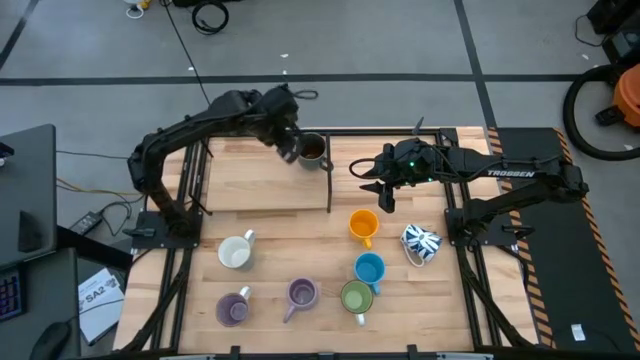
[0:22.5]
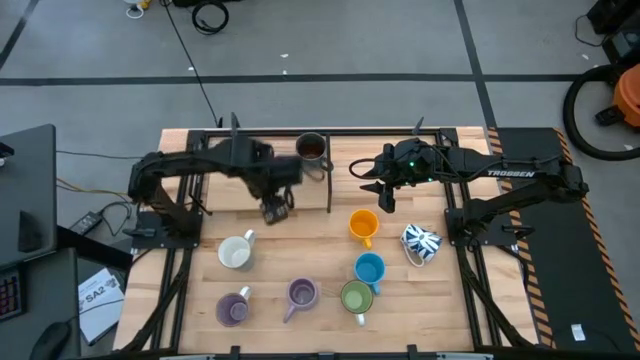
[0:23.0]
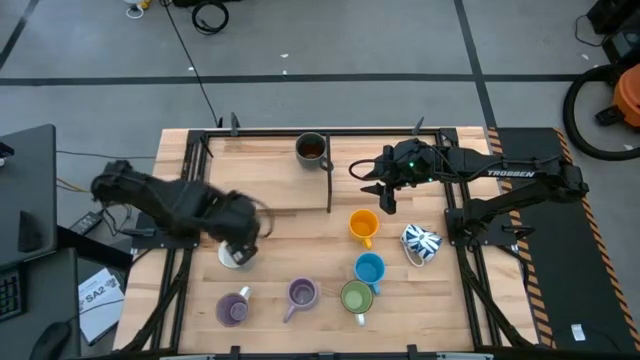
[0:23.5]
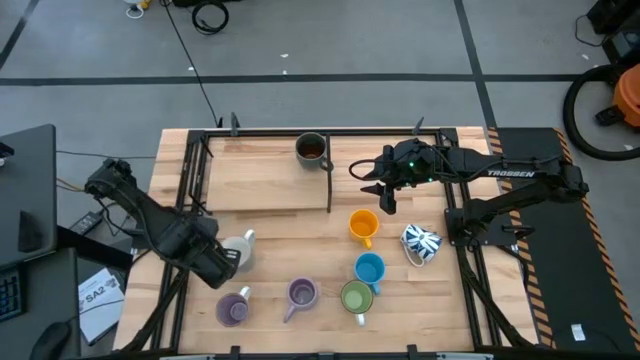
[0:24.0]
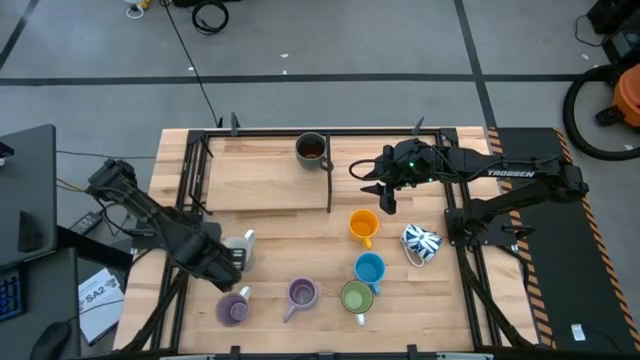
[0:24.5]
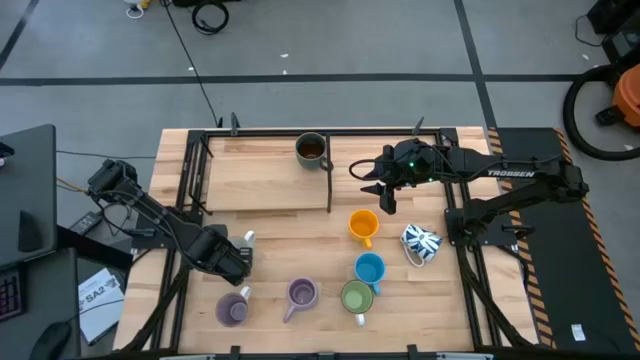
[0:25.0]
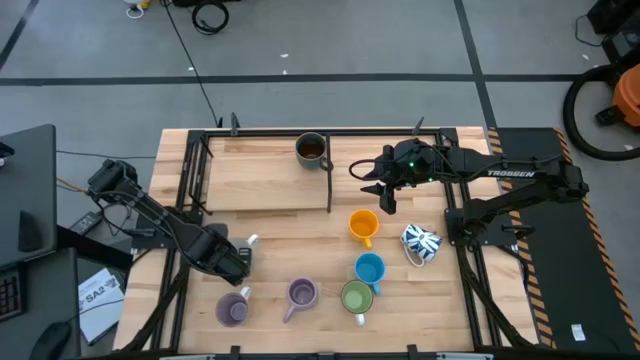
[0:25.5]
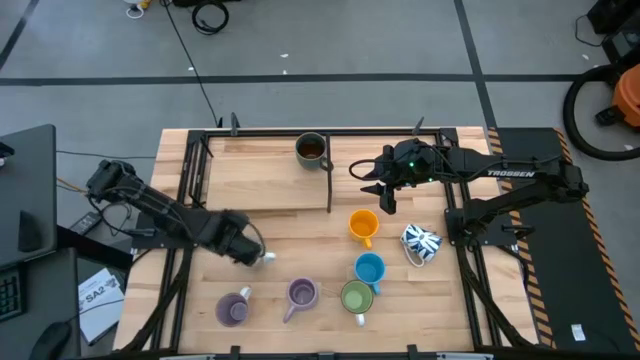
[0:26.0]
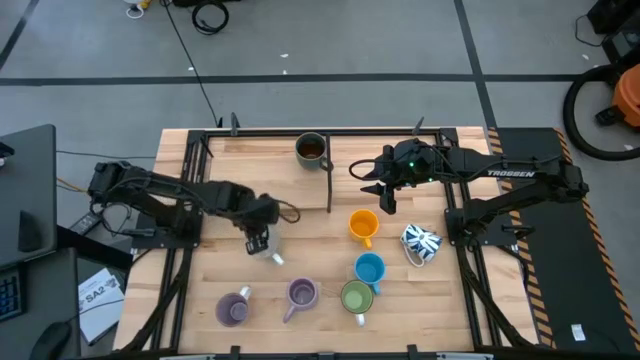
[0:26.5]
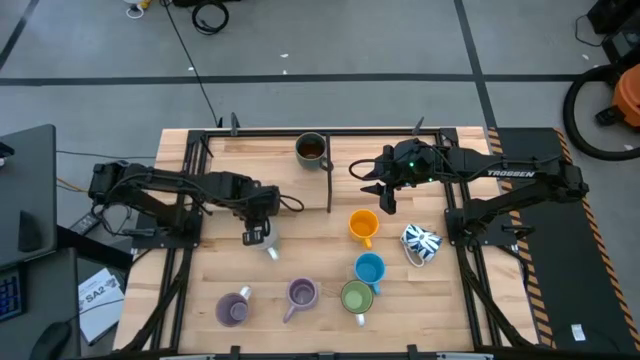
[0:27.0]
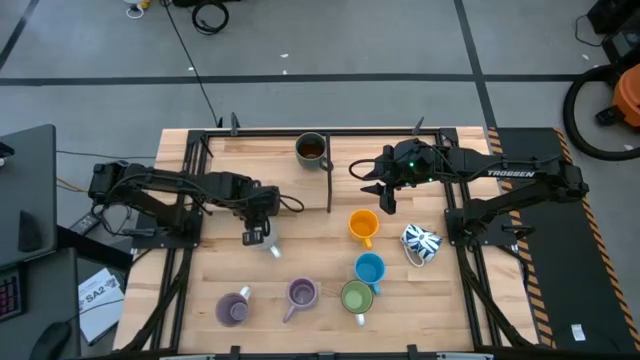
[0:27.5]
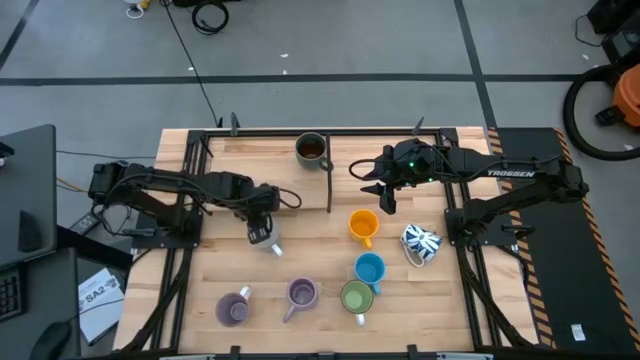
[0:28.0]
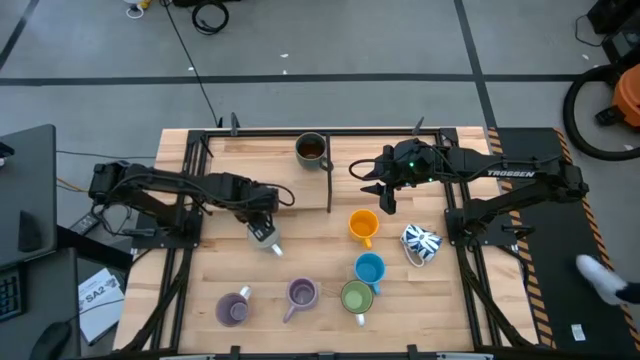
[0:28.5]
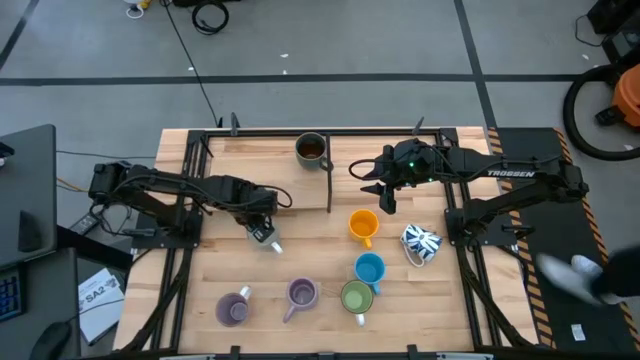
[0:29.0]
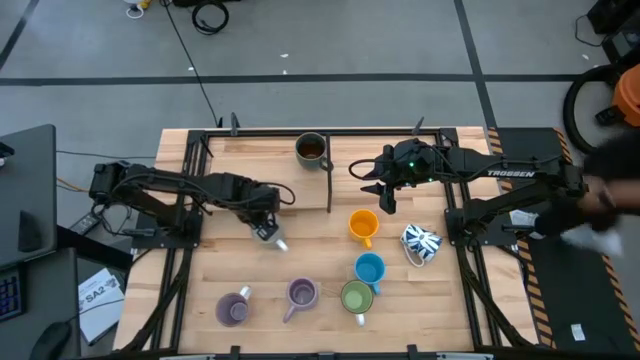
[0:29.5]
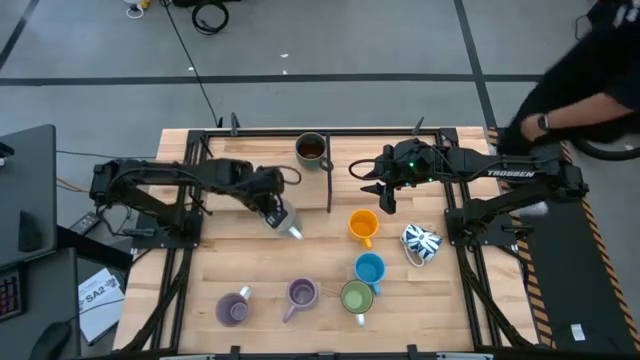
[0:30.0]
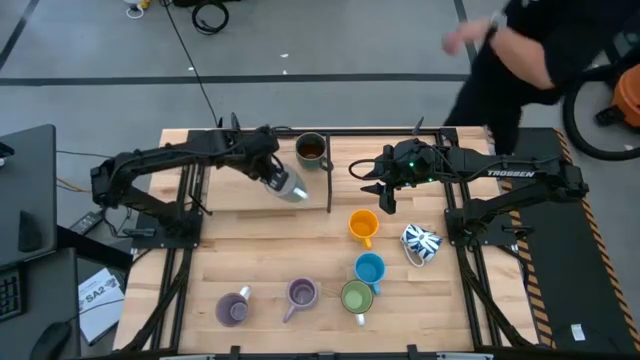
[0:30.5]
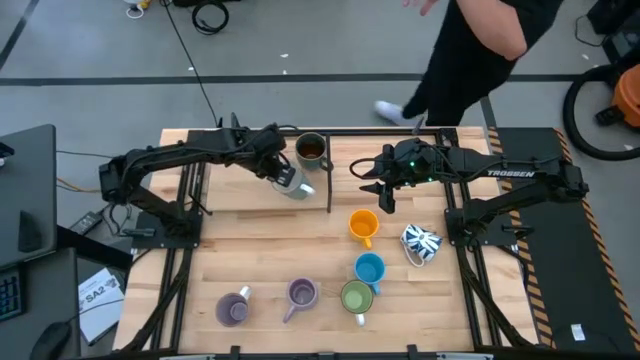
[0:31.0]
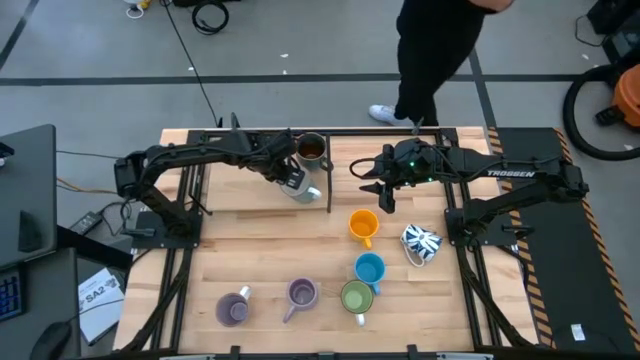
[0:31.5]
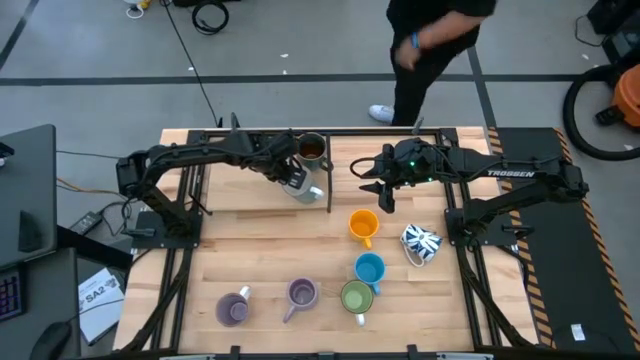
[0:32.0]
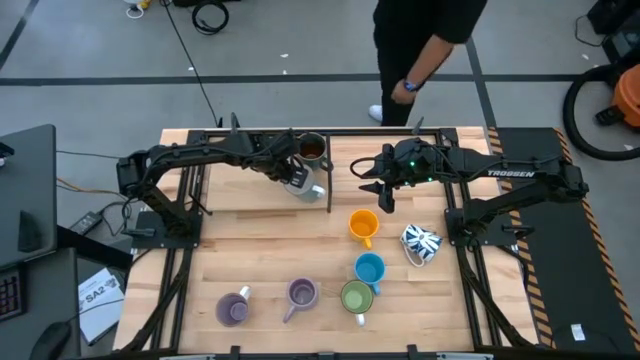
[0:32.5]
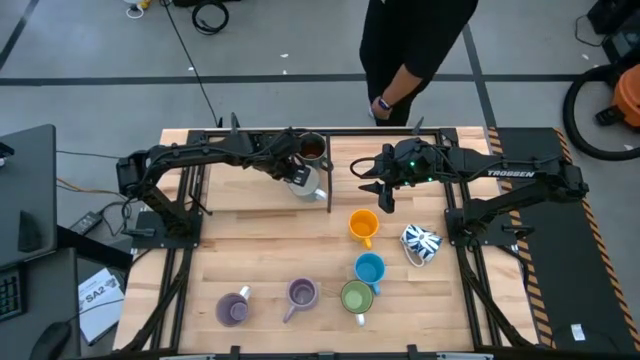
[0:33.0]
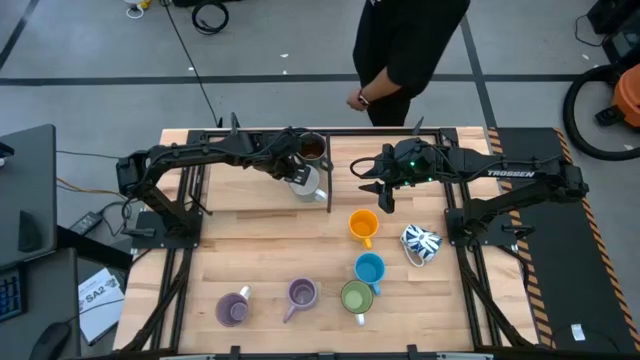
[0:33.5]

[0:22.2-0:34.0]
Task: Place coffee mugs
Put the light blue mug on the shelf

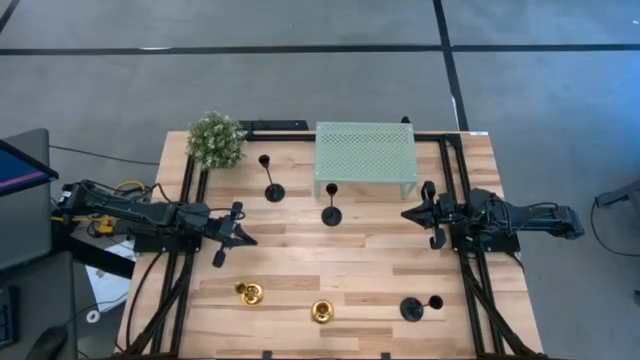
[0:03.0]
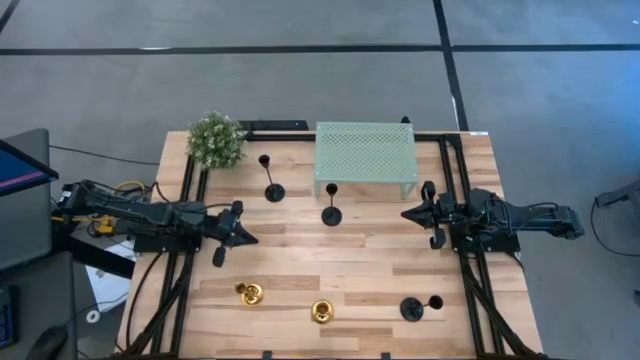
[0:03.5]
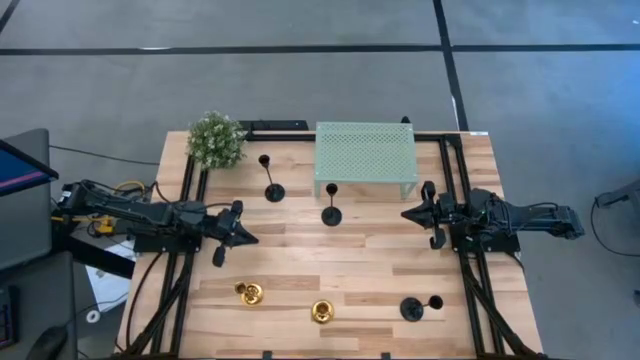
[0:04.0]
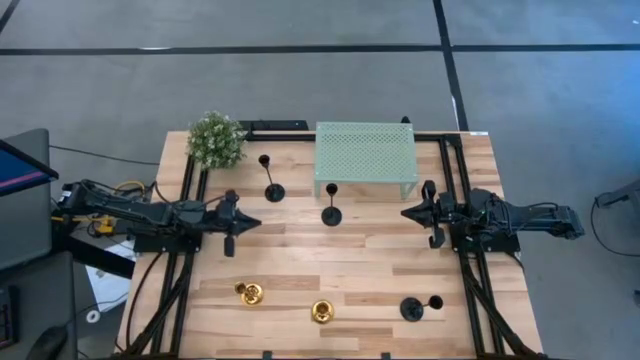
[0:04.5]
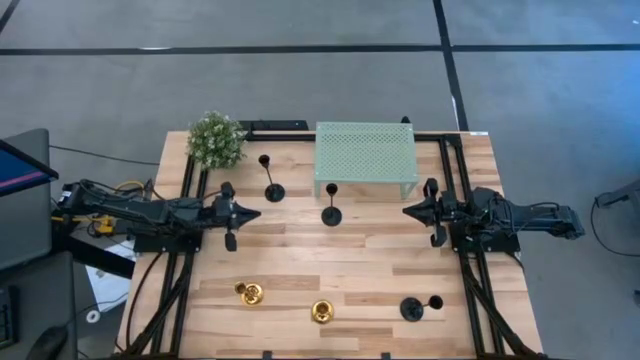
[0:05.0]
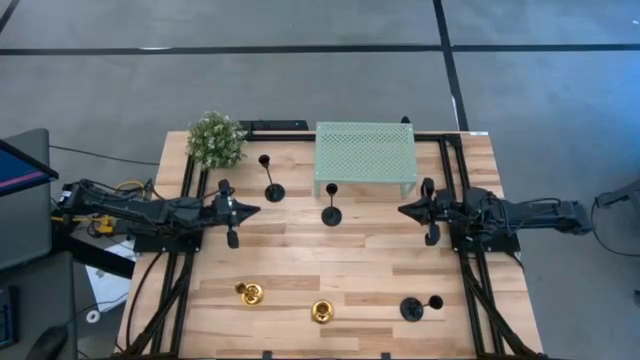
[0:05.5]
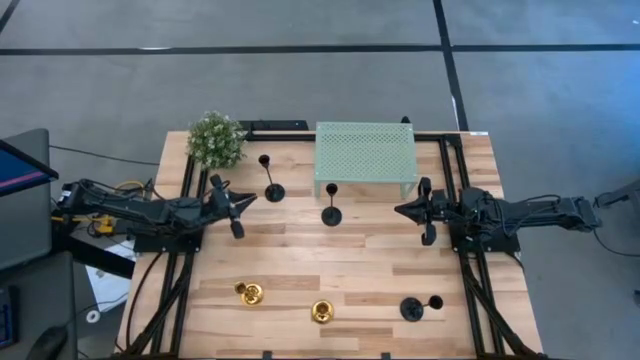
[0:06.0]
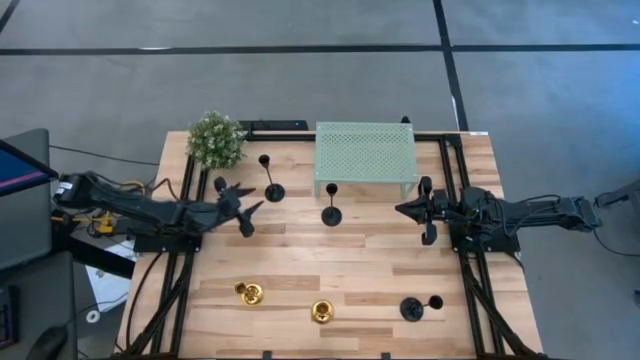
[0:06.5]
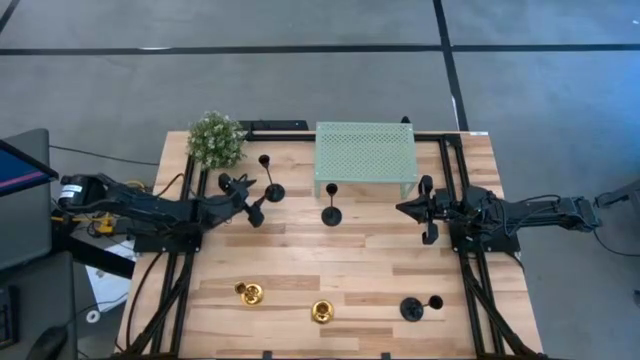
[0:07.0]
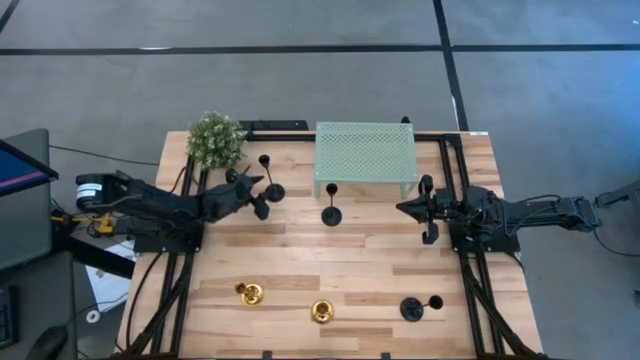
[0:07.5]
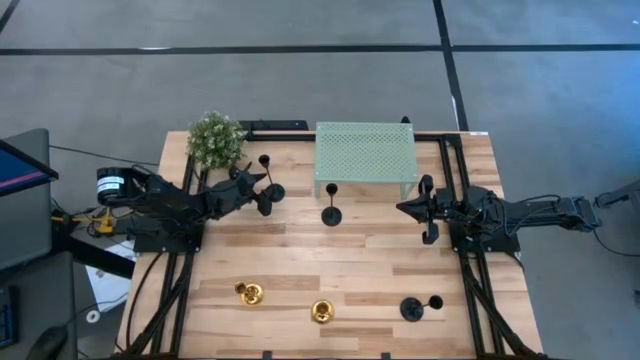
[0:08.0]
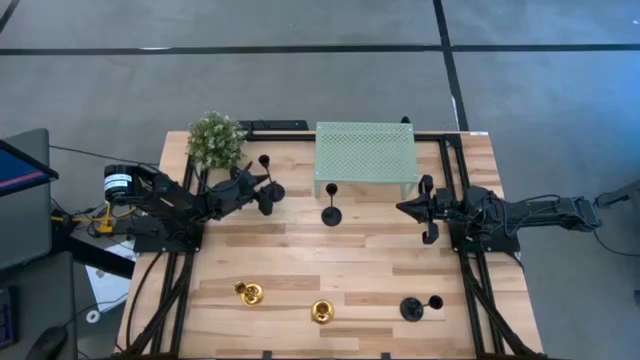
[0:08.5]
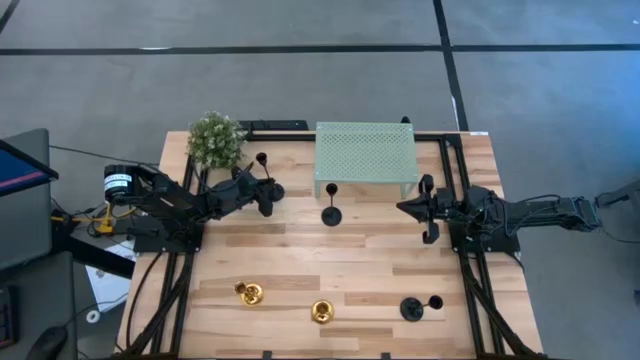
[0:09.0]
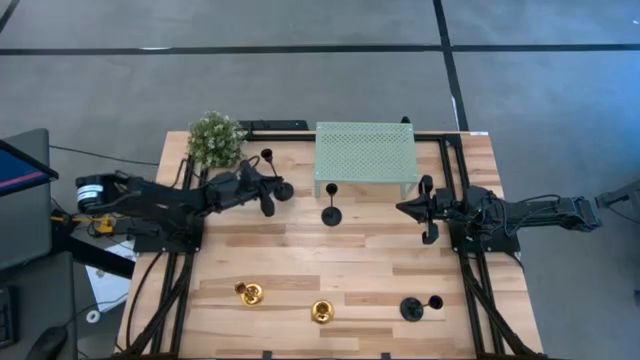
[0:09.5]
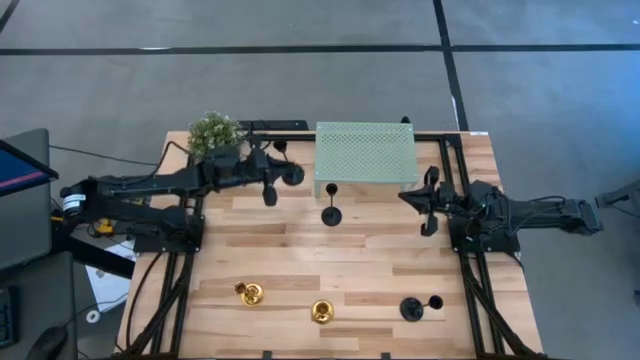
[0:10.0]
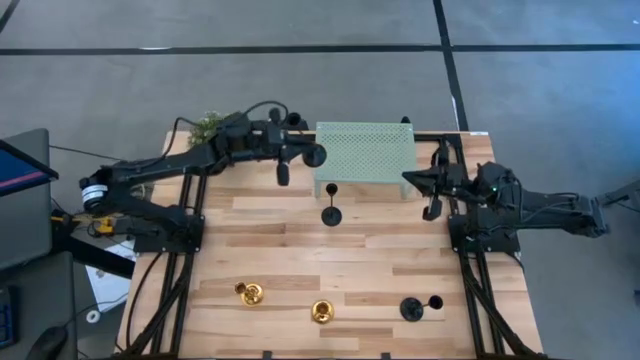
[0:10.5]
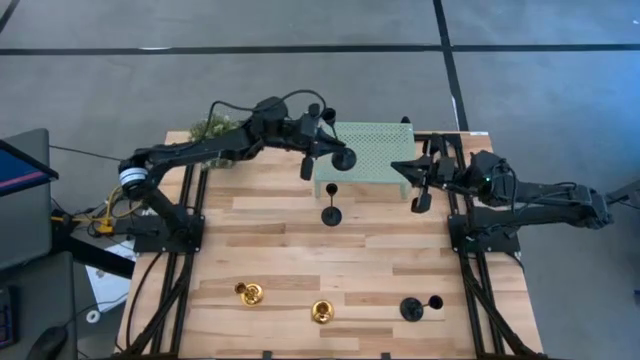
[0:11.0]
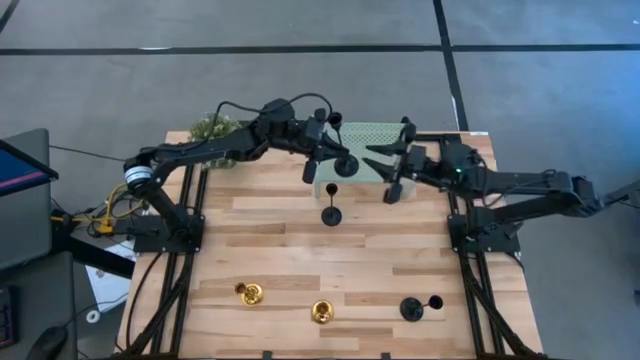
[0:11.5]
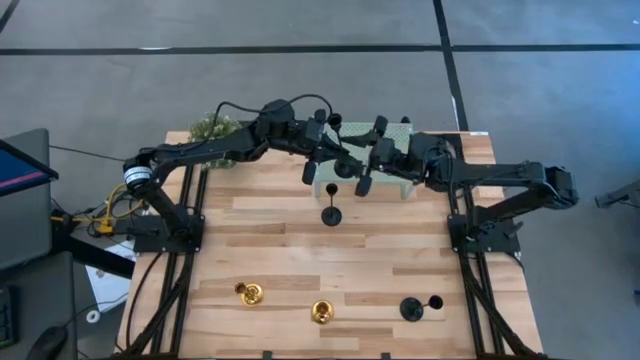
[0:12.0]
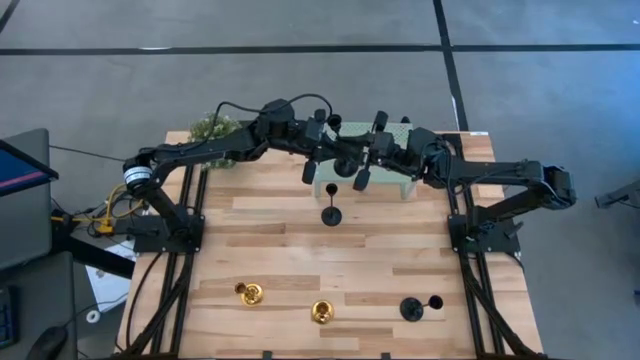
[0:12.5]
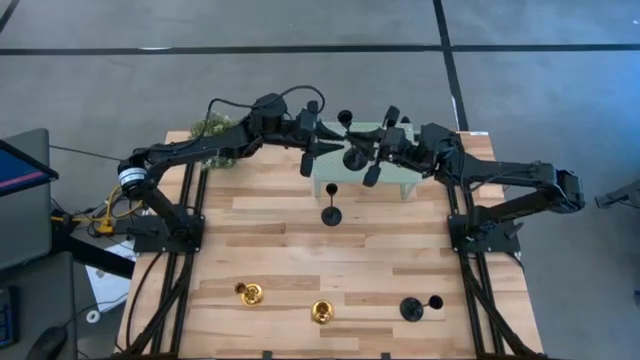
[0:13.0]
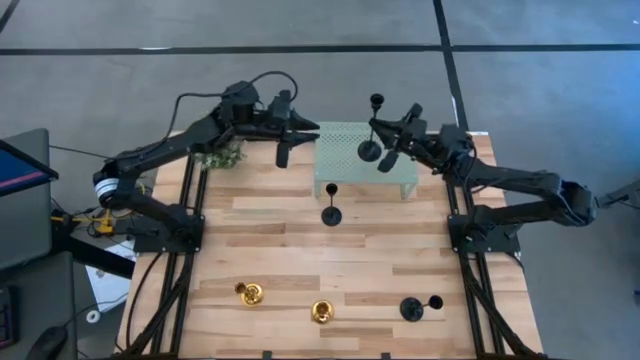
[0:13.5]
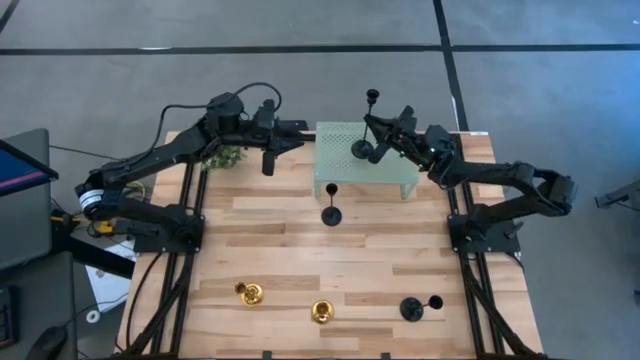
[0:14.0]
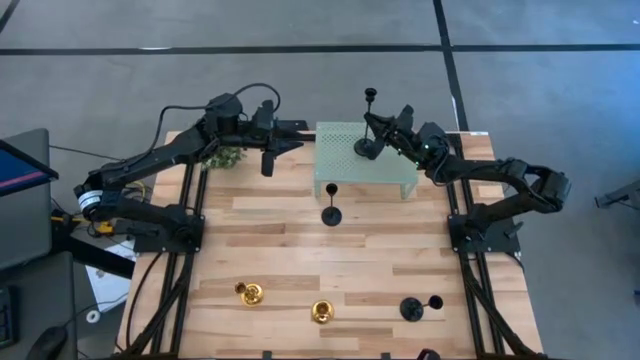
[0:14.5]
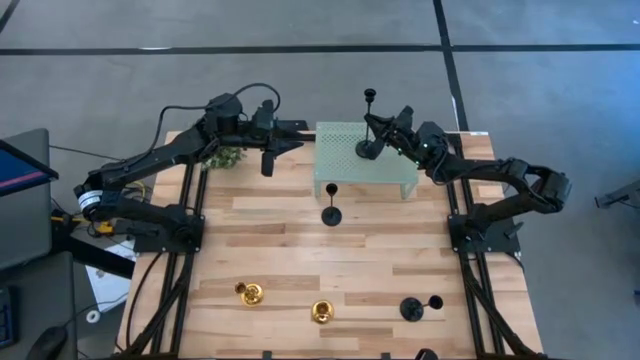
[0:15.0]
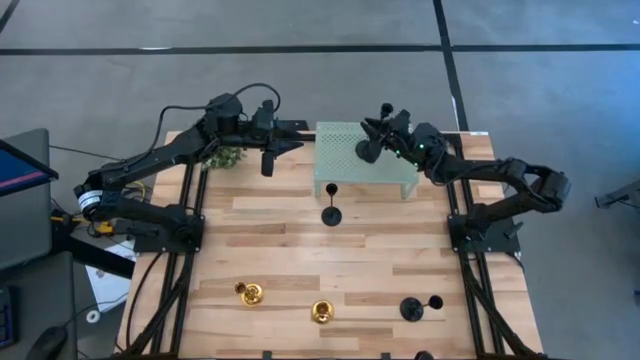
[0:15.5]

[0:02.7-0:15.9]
Task: Pick & Place candle stick holders
Put the left black candle holder on the shelf
